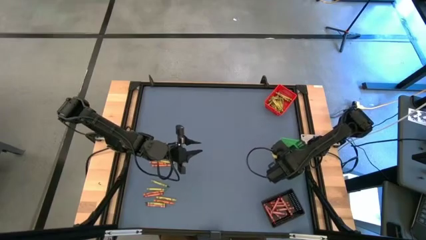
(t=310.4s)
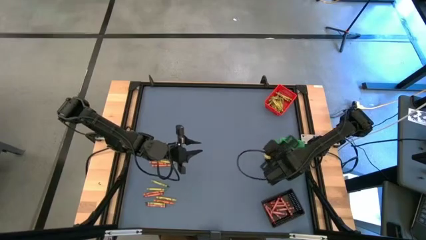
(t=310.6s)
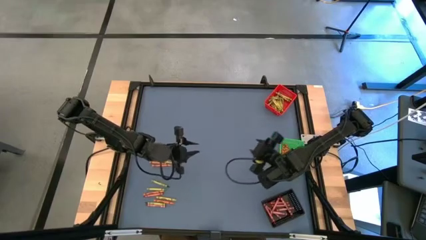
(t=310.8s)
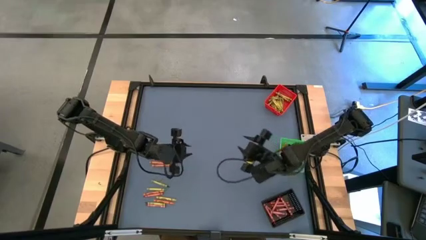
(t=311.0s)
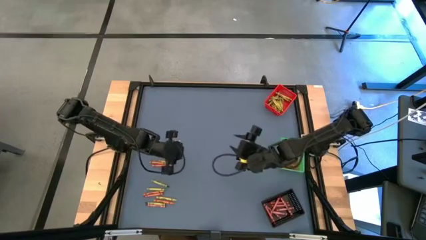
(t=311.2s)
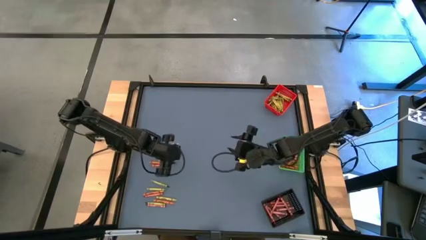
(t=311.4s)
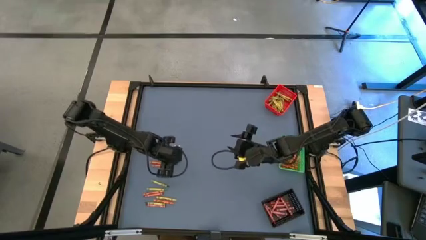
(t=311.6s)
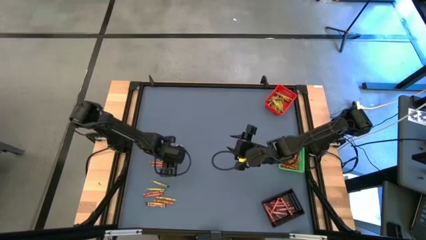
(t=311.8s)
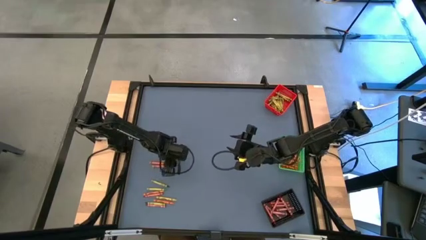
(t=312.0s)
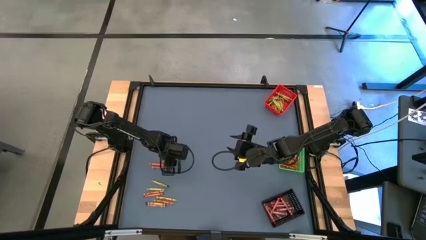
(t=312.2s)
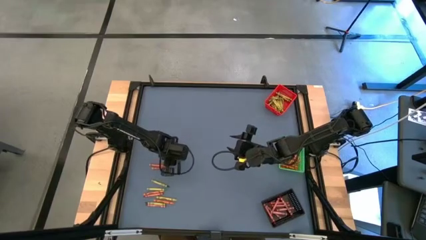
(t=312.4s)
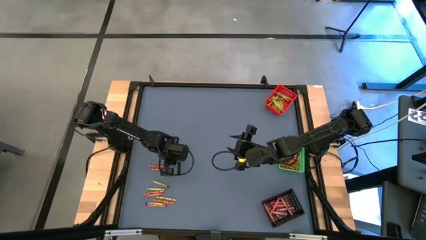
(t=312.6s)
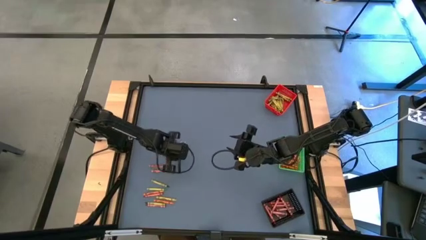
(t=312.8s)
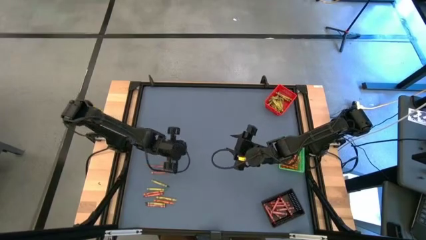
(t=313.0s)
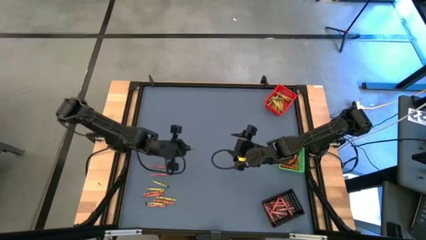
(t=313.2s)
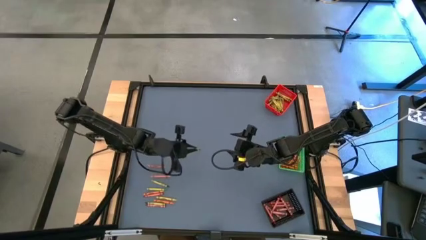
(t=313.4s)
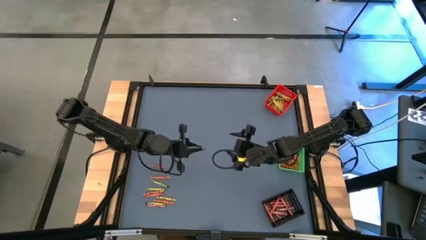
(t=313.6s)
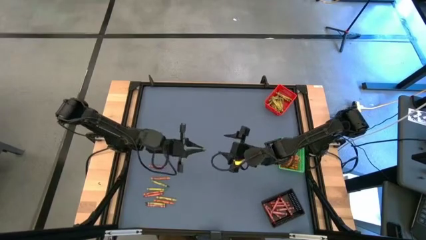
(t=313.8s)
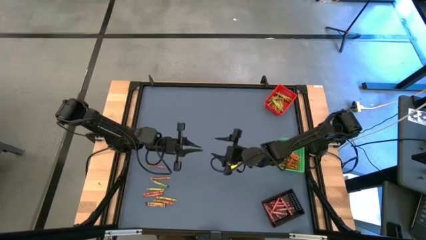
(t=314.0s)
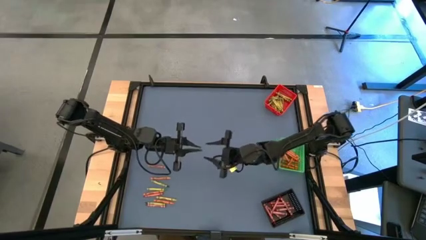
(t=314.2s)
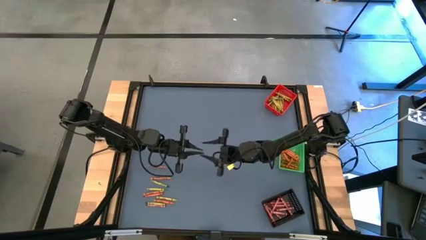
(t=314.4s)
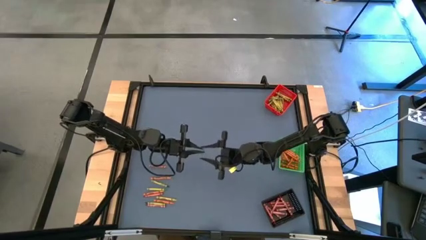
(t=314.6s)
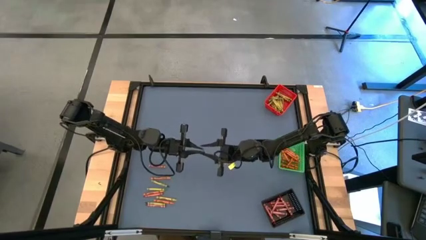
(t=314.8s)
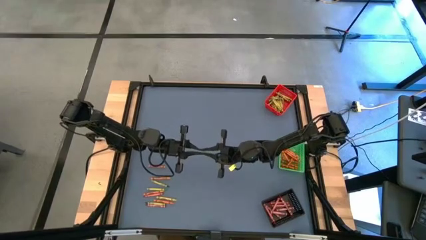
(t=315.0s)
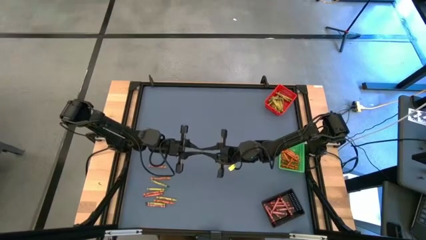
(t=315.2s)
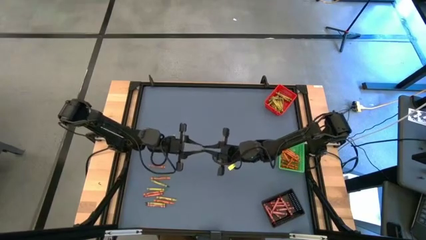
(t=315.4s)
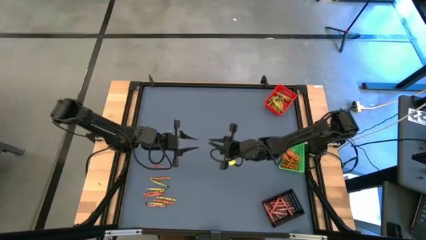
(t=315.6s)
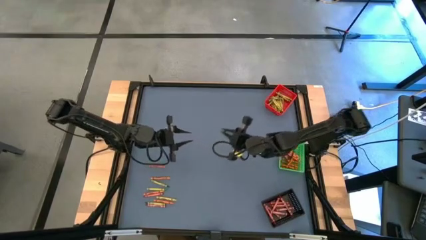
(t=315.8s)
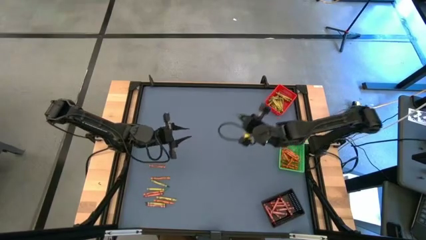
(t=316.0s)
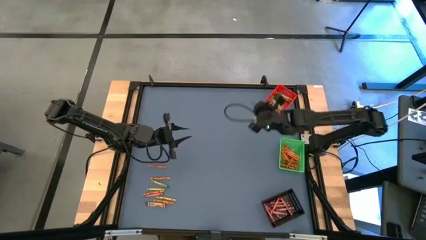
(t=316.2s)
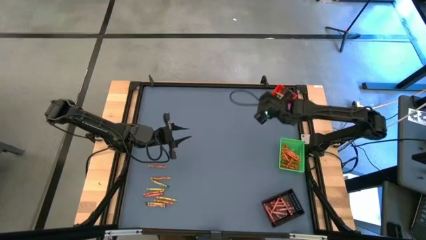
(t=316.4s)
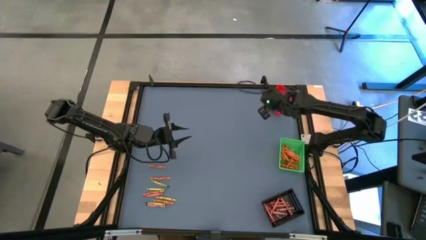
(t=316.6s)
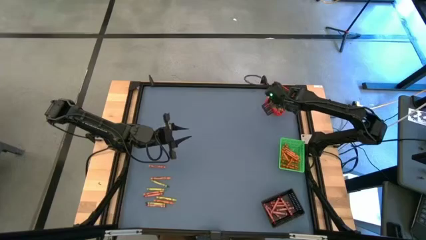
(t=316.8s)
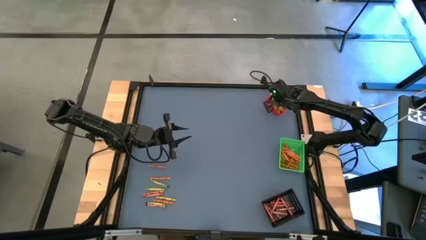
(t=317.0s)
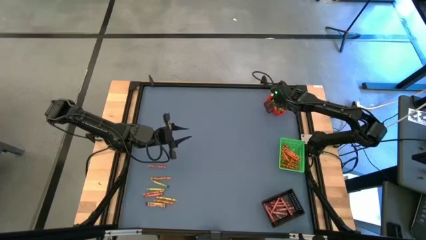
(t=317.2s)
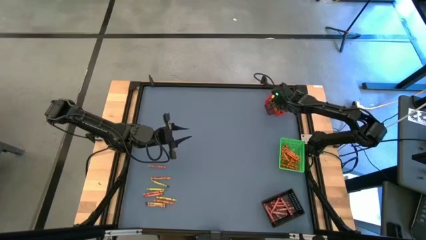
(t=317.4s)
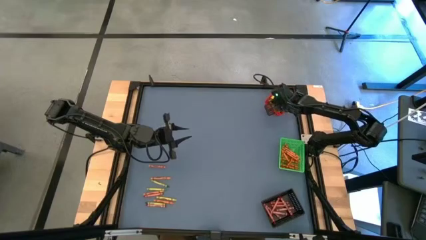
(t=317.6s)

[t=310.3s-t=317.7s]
Task: Sort crayons
Put the green crayon into the red bin

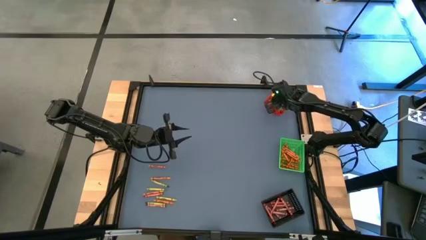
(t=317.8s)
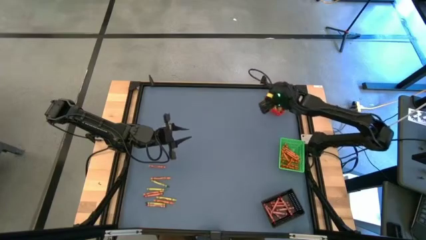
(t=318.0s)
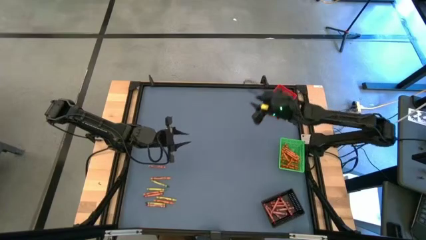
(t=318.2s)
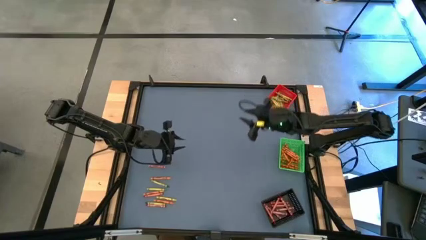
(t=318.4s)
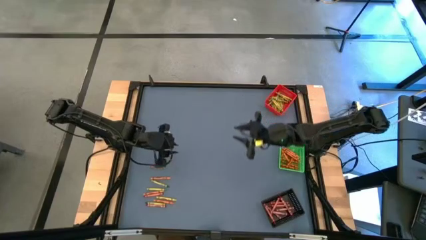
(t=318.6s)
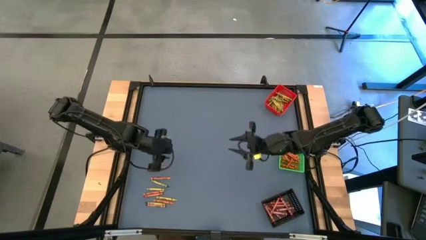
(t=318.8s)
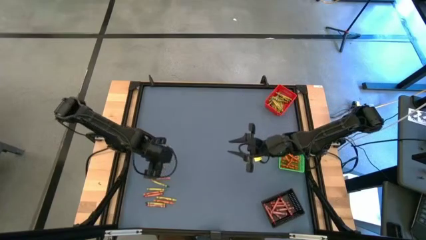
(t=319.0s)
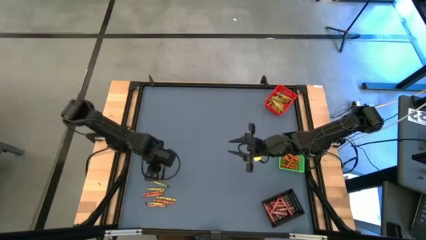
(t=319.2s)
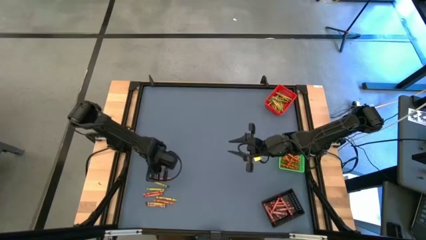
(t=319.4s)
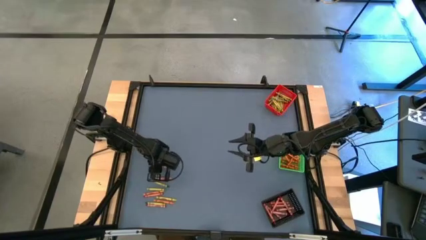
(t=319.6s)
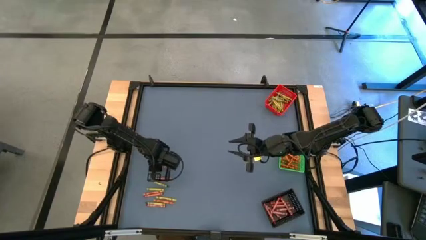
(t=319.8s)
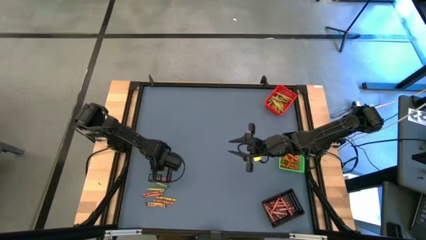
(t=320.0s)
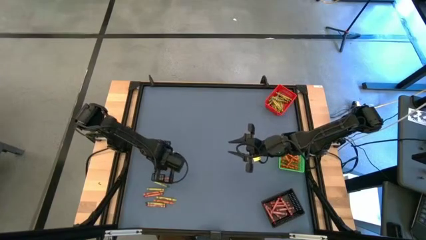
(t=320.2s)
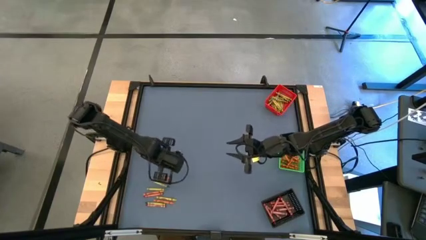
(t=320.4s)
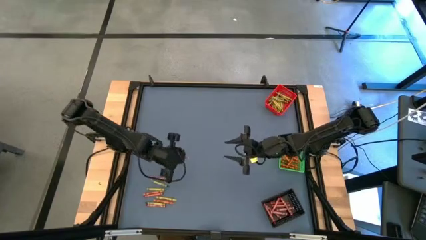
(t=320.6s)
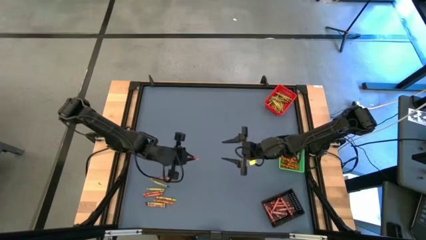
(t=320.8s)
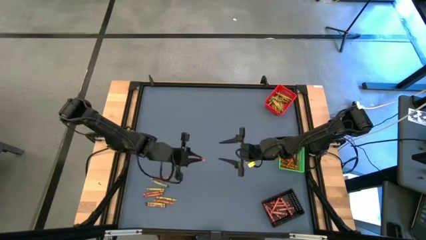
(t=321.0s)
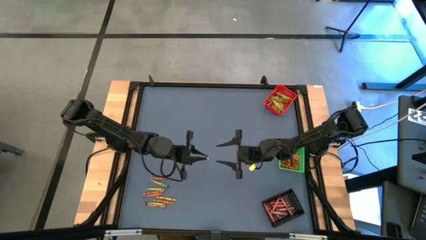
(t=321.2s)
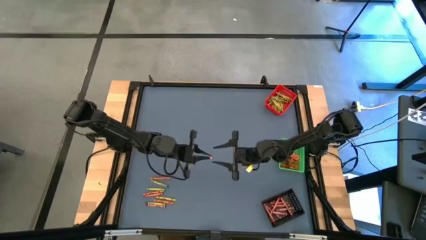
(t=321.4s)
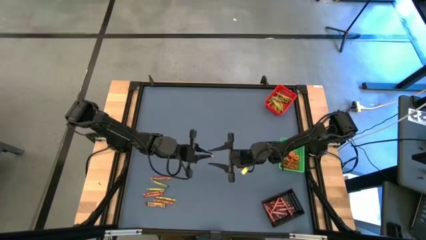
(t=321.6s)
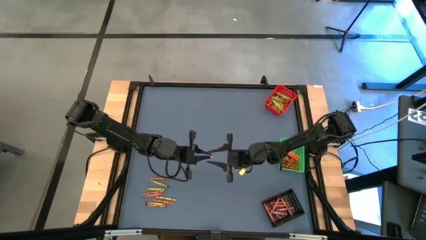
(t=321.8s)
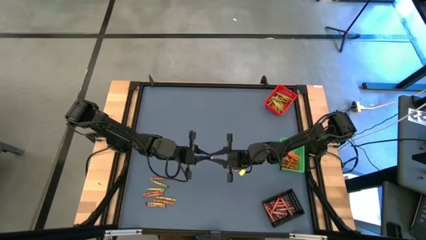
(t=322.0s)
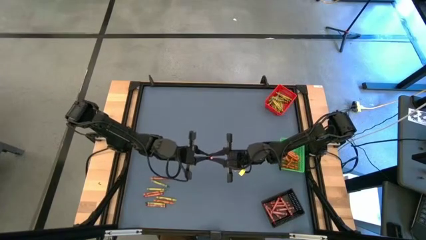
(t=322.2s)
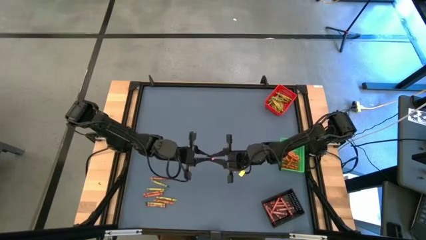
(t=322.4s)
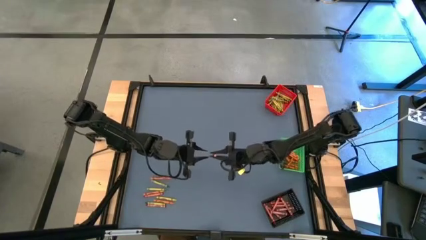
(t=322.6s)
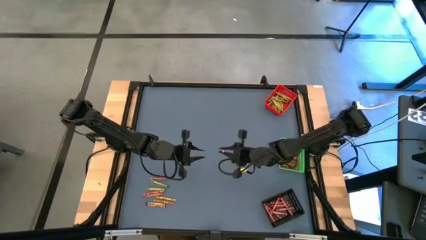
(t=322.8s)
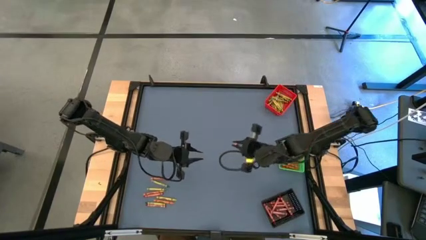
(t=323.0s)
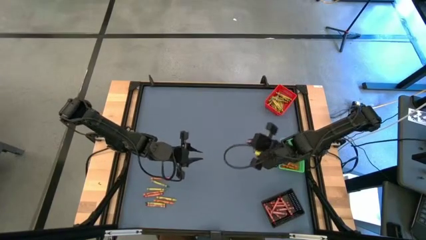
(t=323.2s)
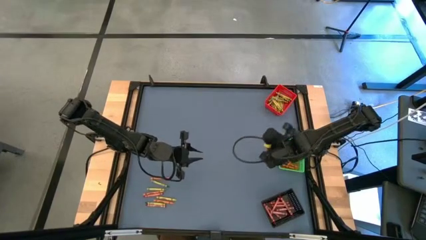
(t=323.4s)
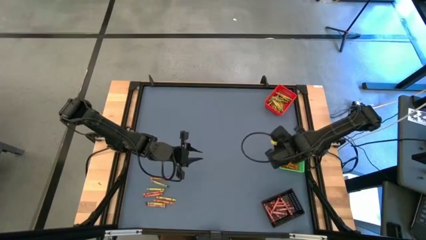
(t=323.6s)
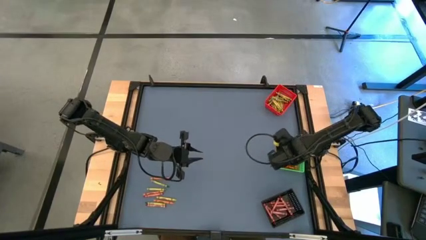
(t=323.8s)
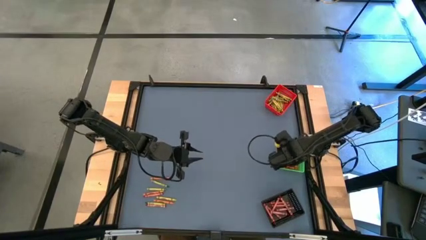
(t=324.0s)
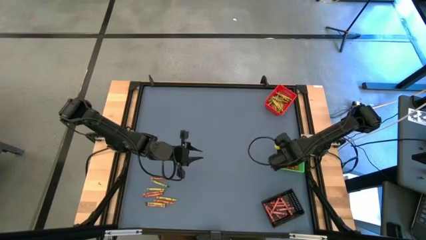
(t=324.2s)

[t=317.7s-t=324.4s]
Put the orange crayon into the green bin
